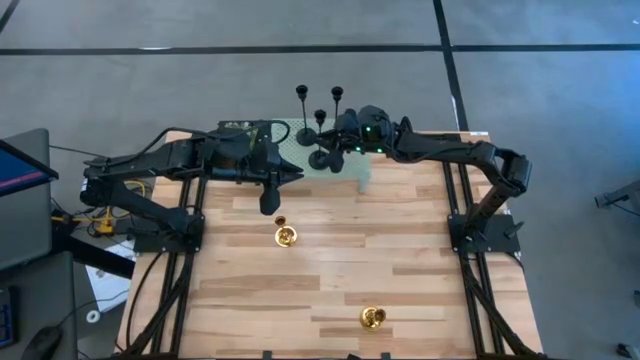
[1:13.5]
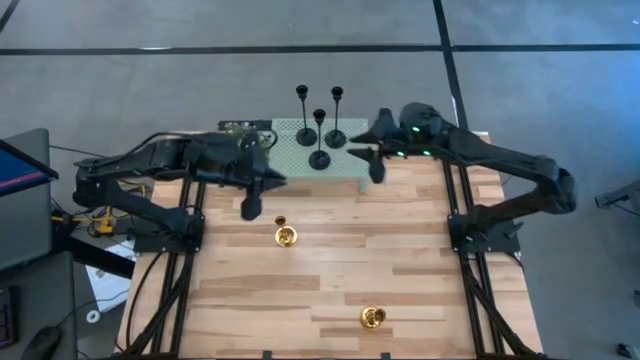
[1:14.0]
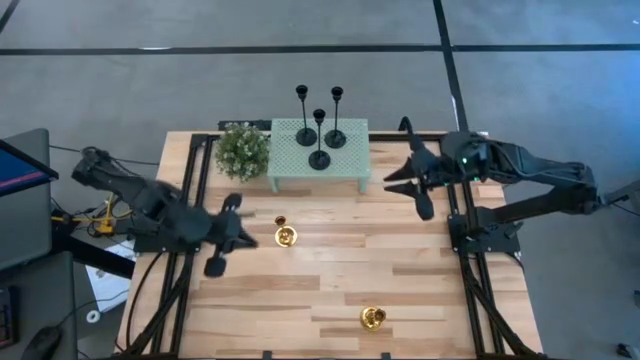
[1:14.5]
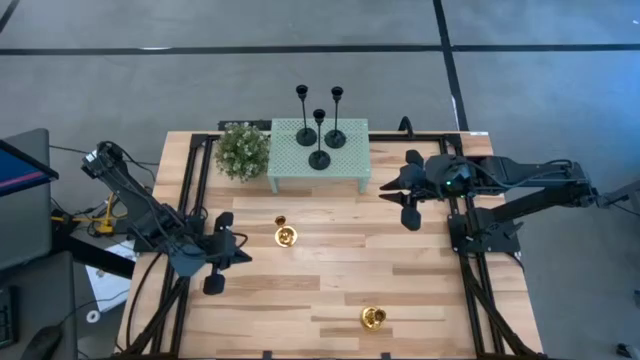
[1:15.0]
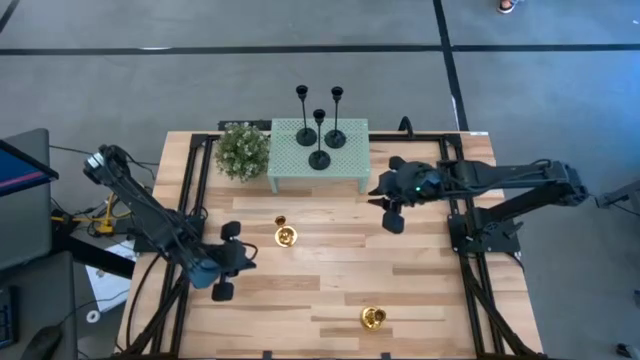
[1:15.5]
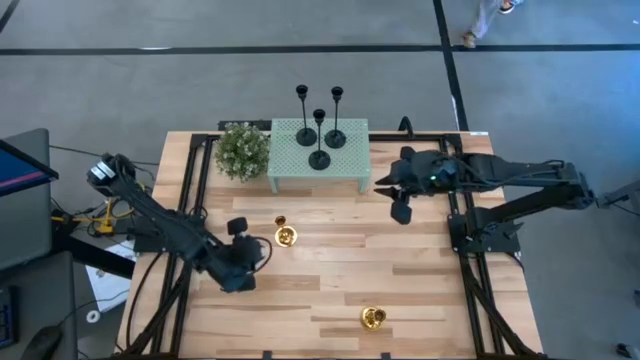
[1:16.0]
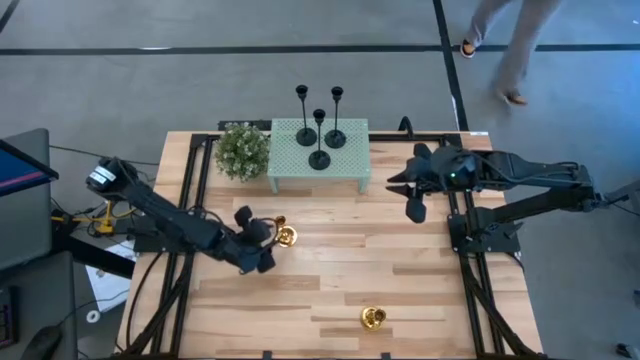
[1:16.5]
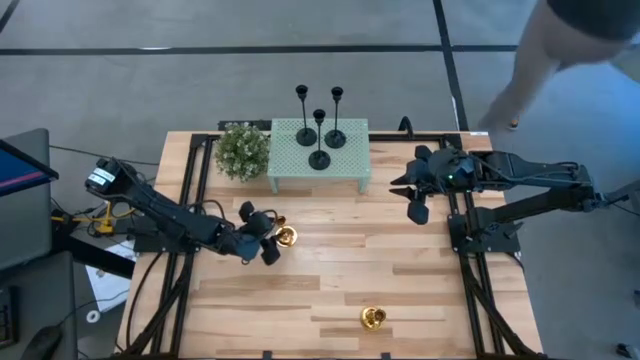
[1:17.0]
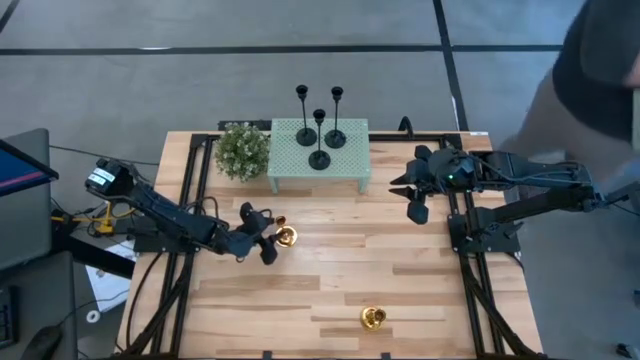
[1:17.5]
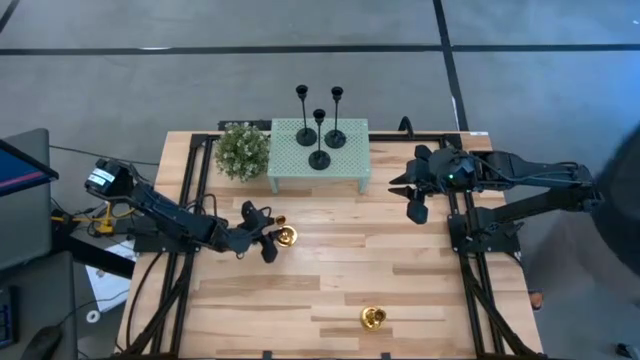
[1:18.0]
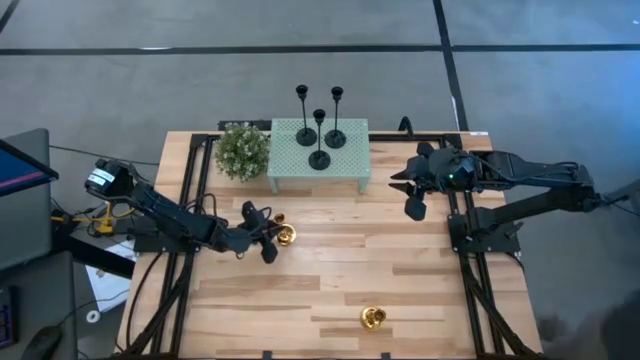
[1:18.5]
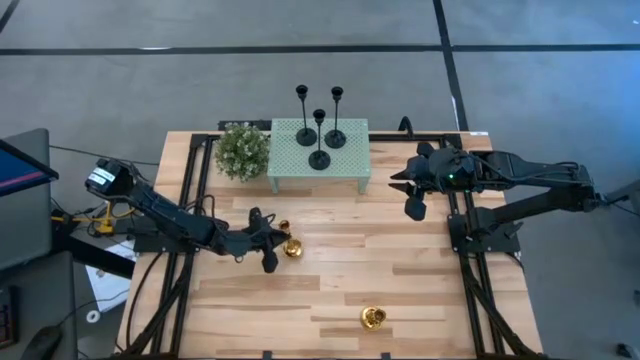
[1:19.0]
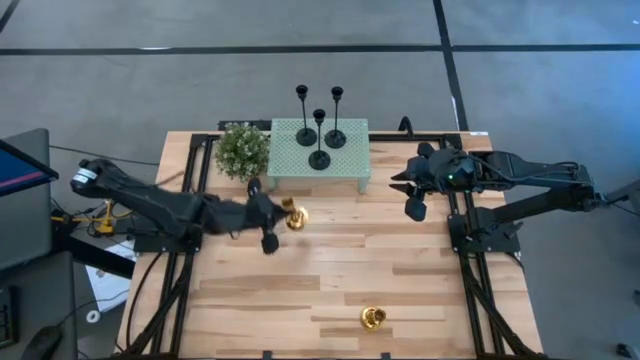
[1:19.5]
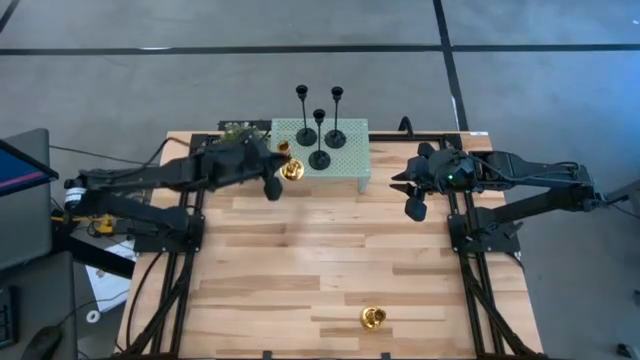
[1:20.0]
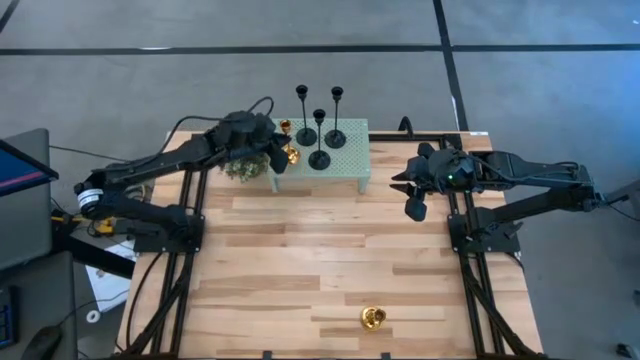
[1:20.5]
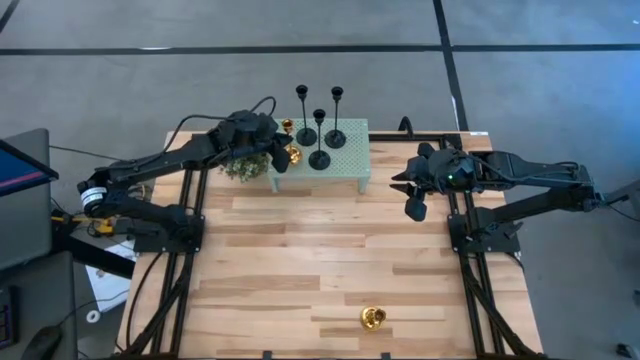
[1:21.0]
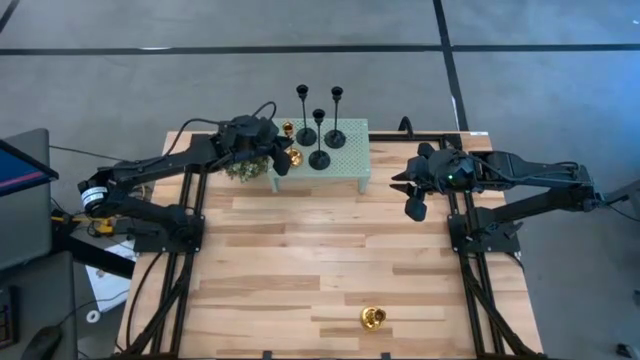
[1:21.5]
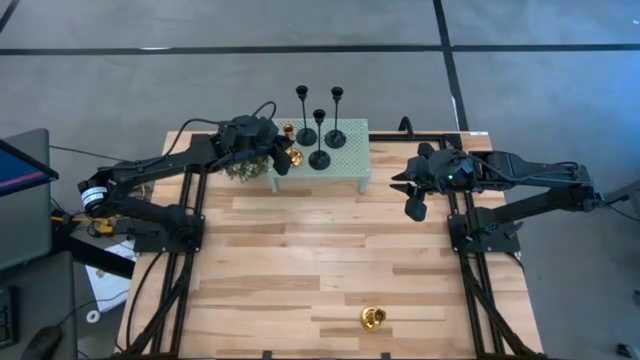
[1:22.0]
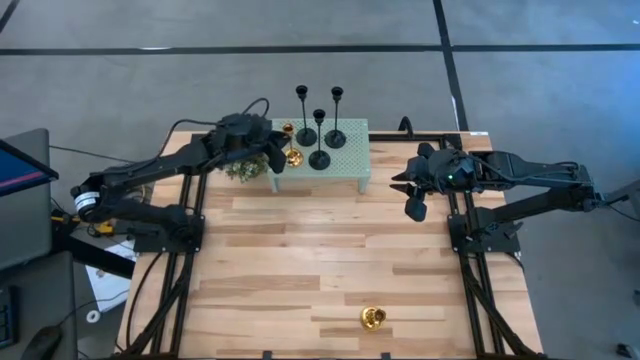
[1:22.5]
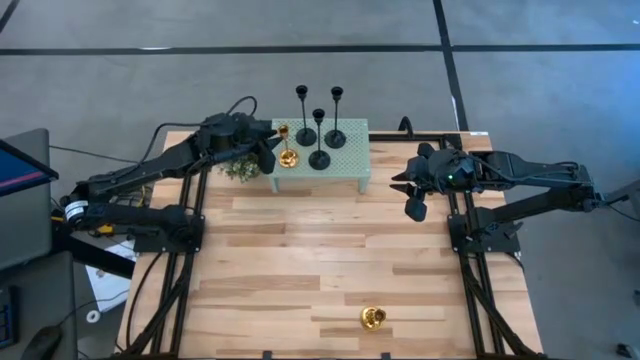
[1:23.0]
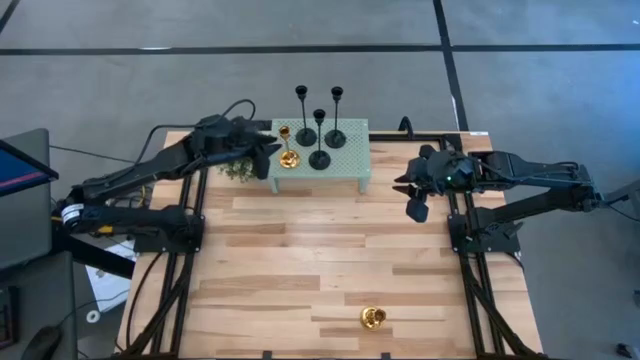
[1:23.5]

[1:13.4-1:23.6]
Task: Pick & Place candle stick holders
Put the top gold candle holder on the shelf

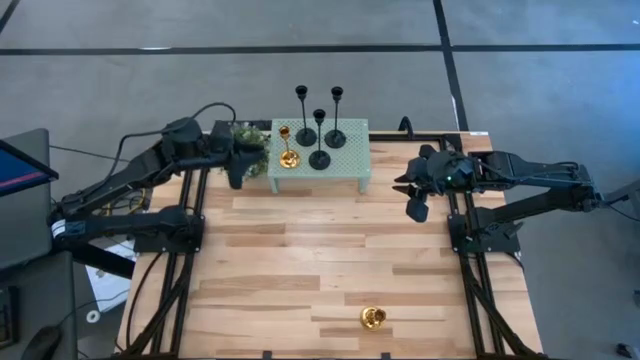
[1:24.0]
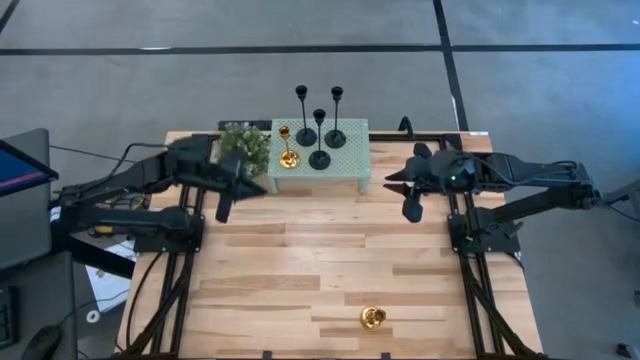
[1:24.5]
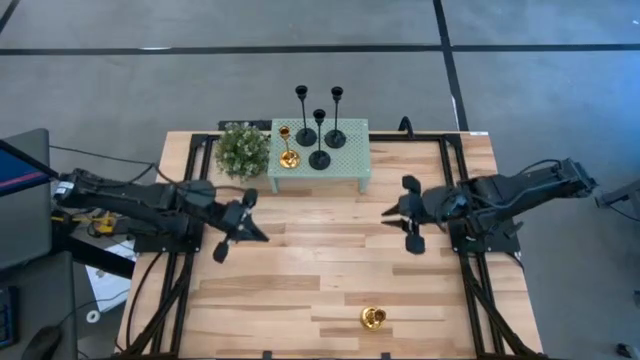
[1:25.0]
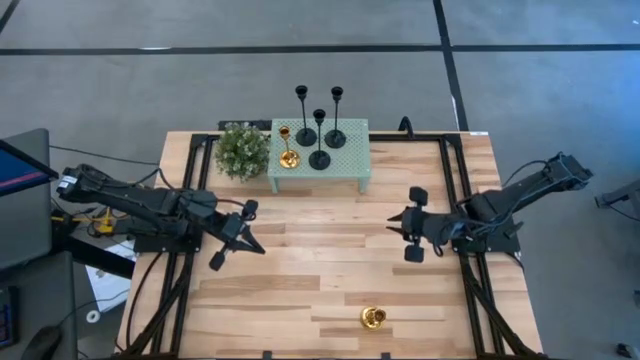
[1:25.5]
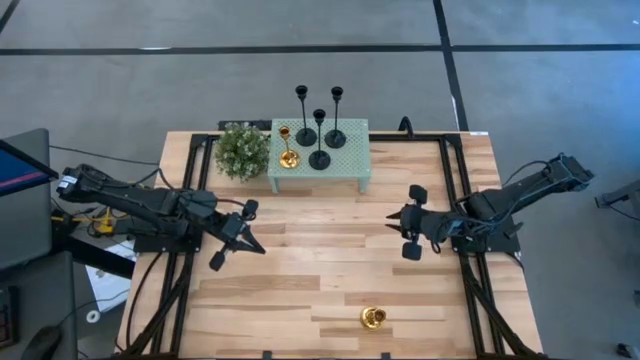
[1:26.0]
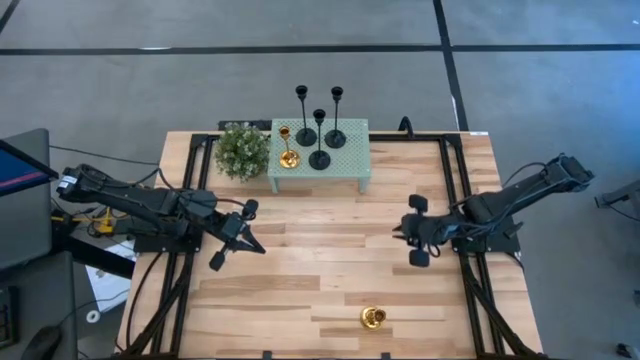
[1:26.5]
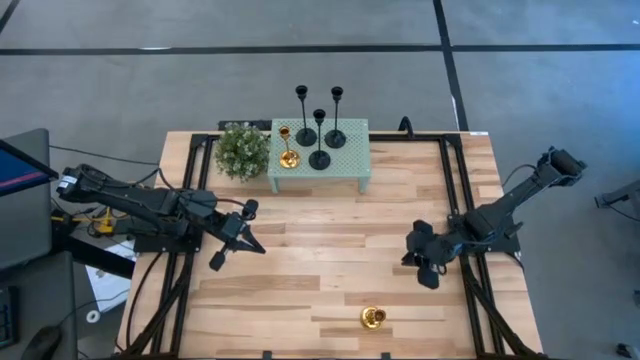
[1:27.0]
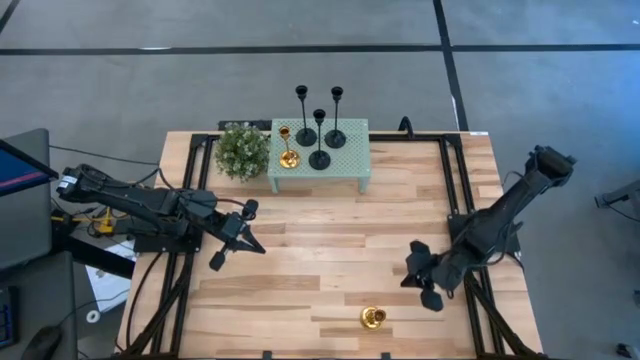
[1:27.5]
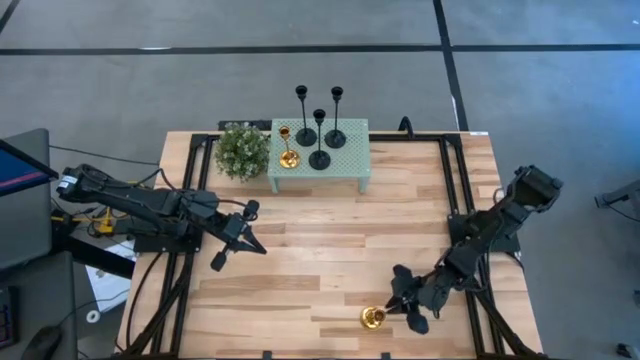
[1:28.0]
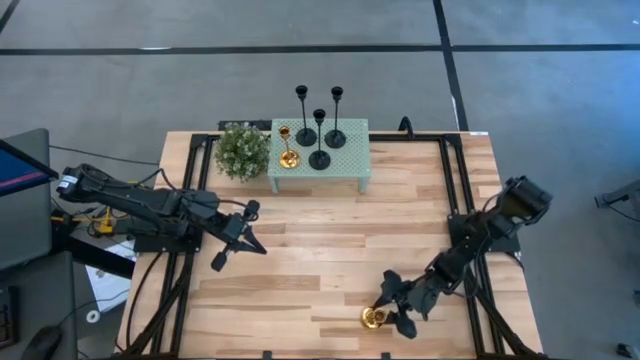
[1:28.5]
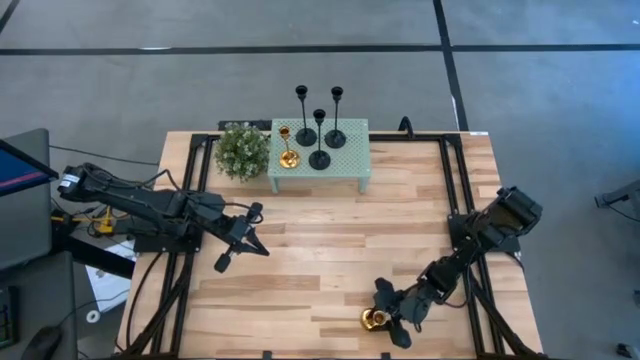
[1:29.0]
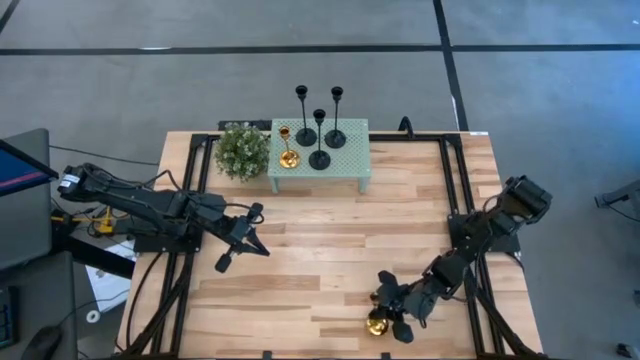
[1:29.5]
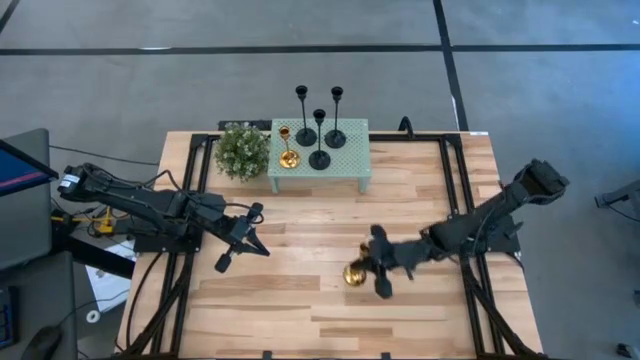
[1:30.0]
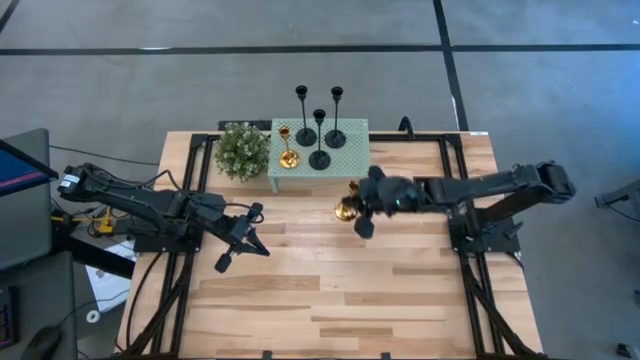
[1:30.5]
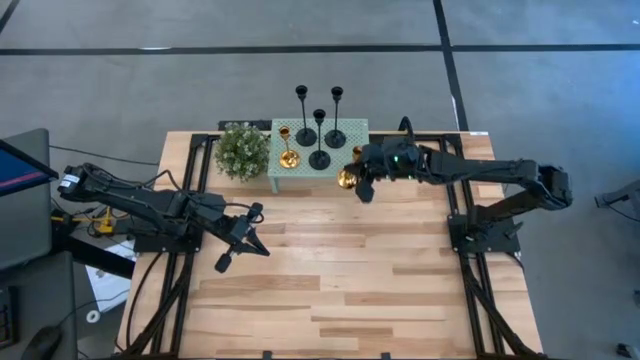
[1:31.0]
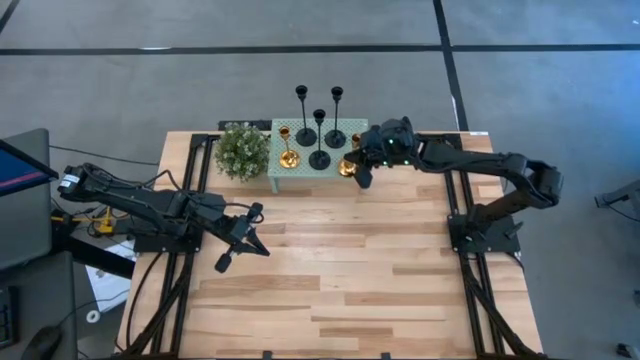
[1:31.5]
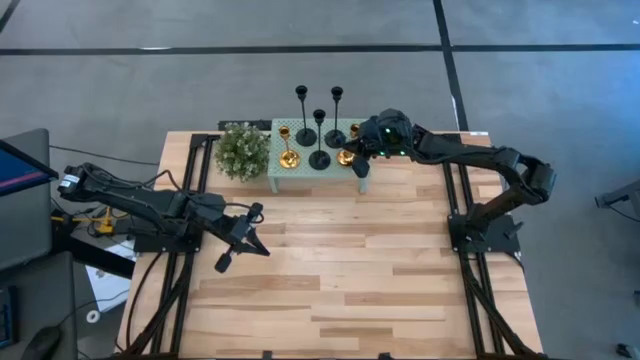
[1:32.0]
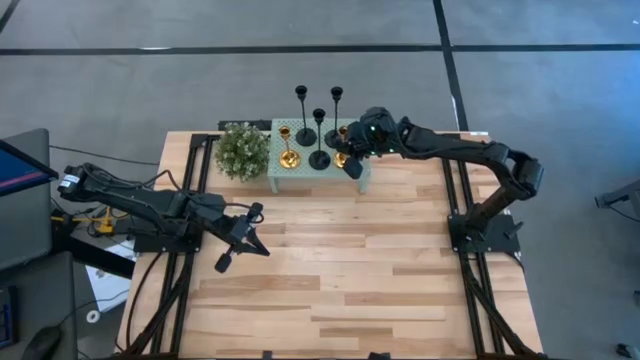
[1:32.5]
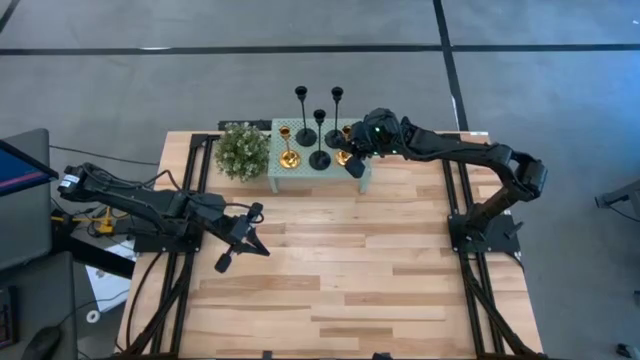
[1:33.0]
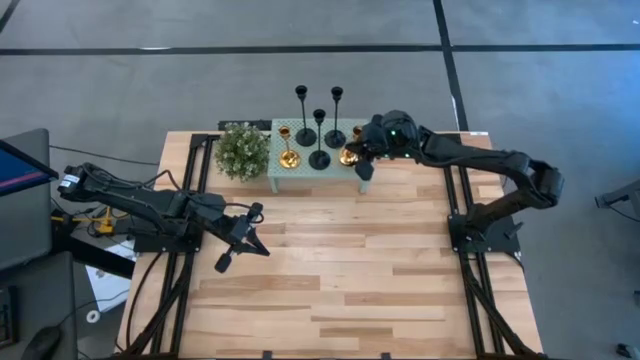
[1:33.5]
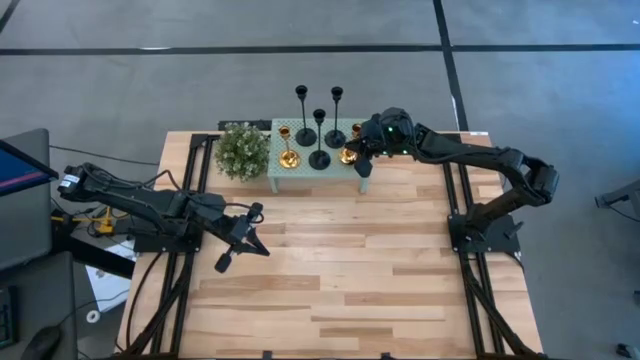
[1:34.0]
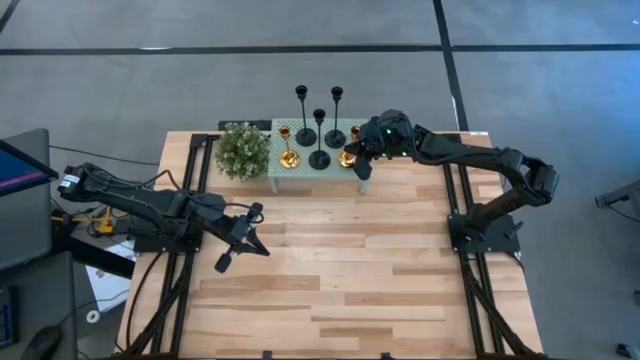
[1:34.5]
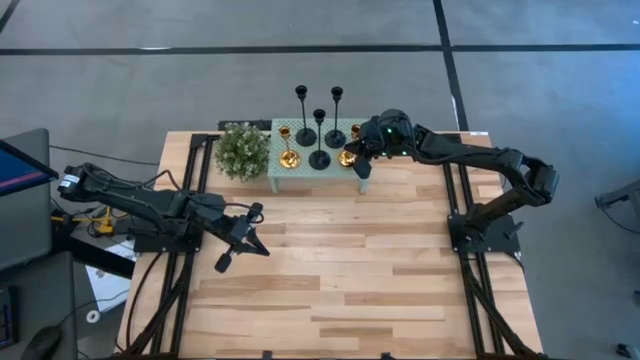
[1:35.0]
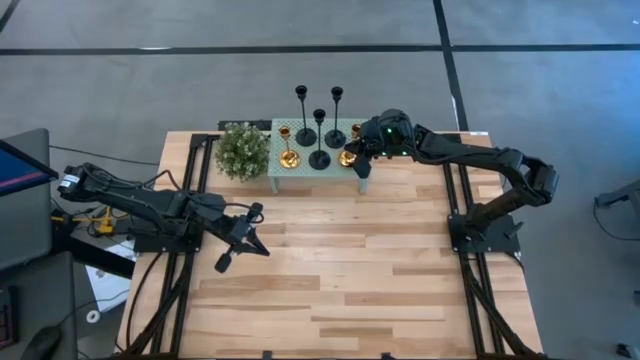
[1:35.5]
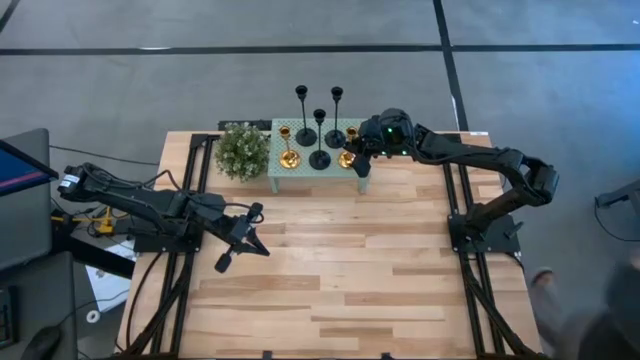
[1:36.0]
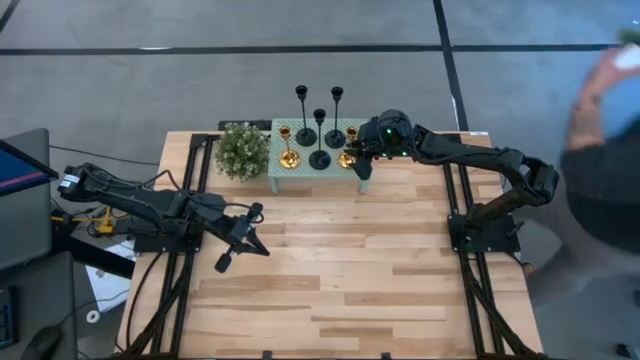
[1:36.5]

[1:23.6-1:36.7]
Put the gold candle holder on the shelf
